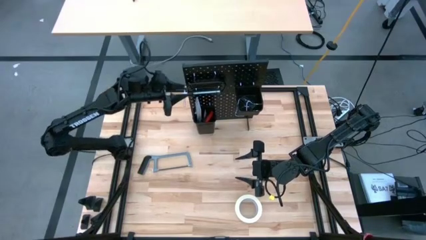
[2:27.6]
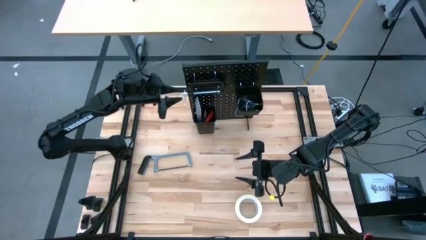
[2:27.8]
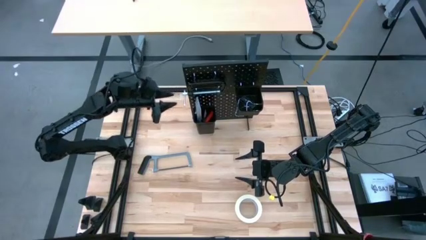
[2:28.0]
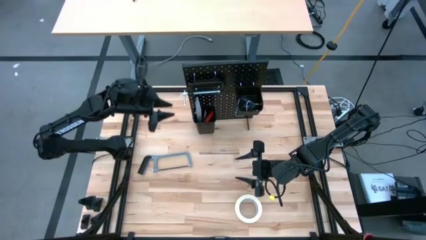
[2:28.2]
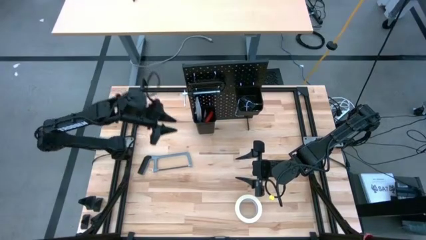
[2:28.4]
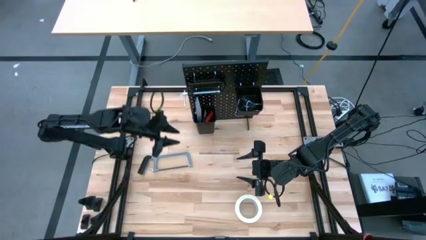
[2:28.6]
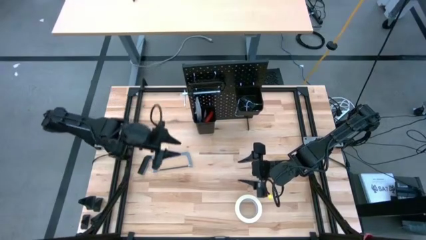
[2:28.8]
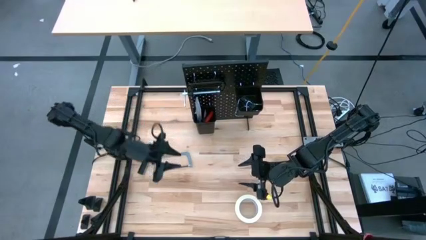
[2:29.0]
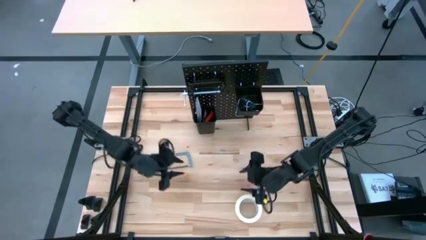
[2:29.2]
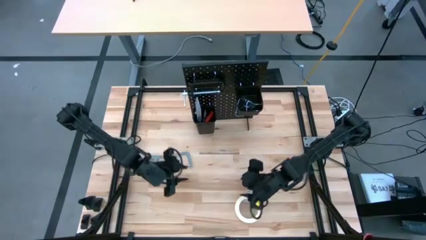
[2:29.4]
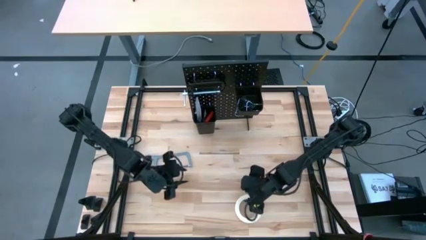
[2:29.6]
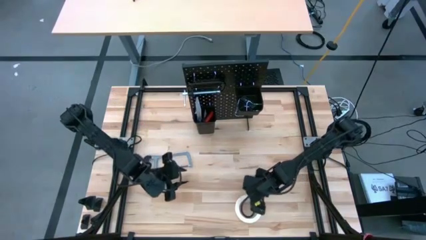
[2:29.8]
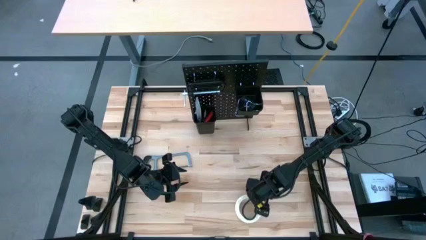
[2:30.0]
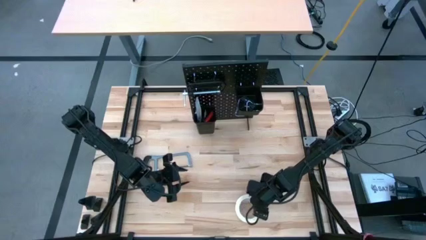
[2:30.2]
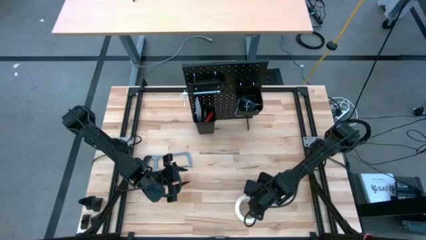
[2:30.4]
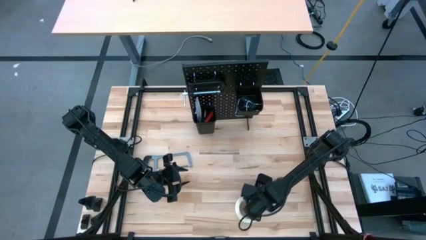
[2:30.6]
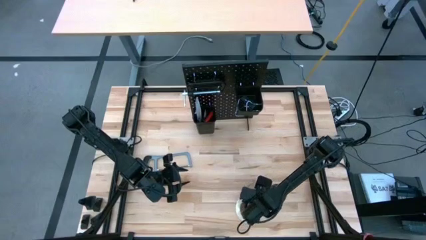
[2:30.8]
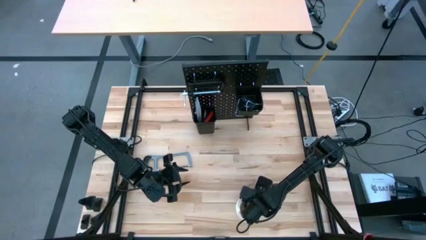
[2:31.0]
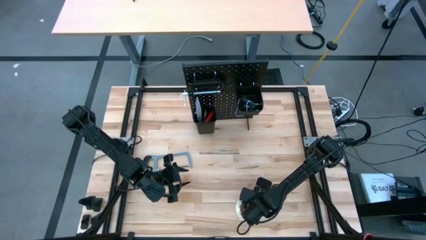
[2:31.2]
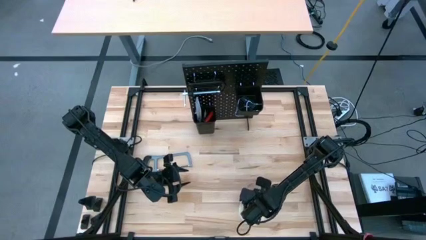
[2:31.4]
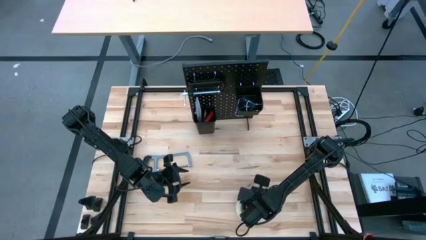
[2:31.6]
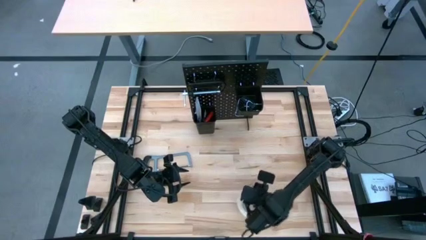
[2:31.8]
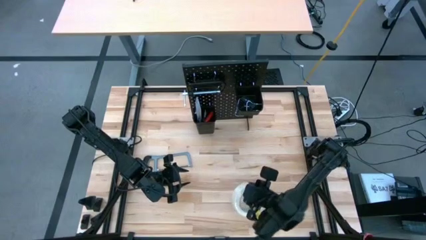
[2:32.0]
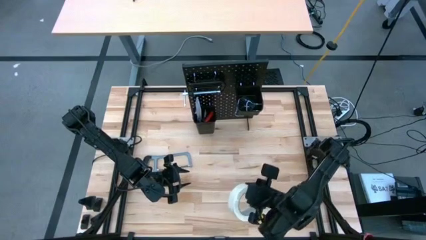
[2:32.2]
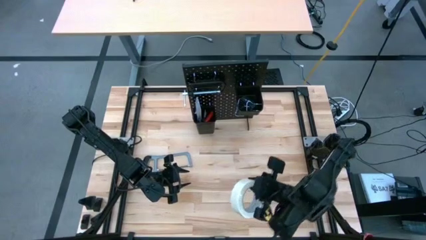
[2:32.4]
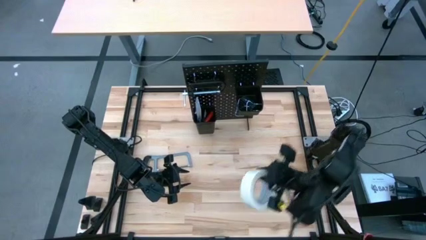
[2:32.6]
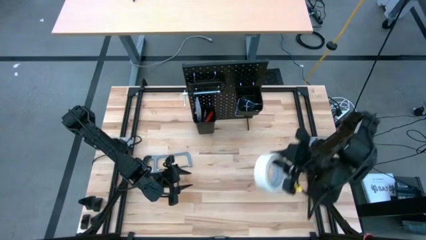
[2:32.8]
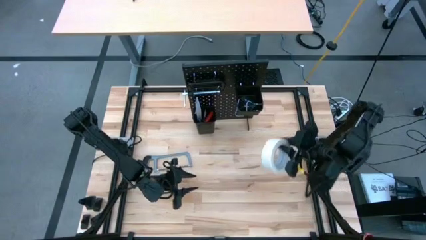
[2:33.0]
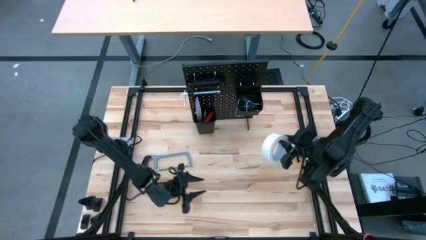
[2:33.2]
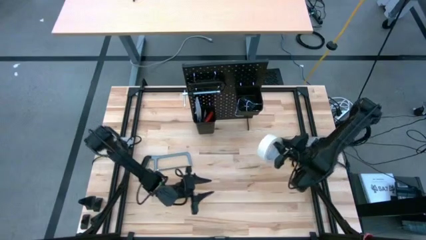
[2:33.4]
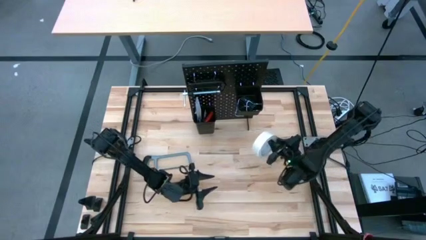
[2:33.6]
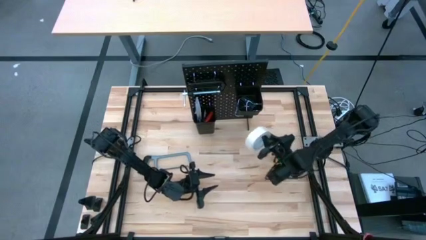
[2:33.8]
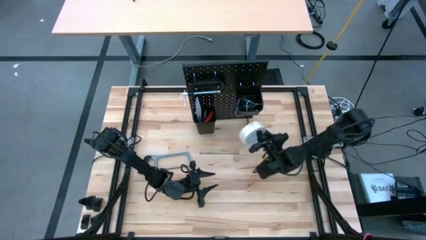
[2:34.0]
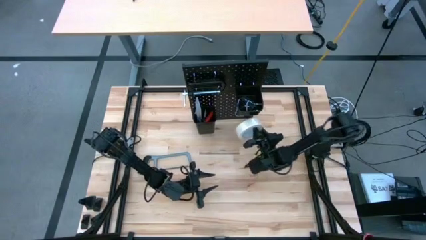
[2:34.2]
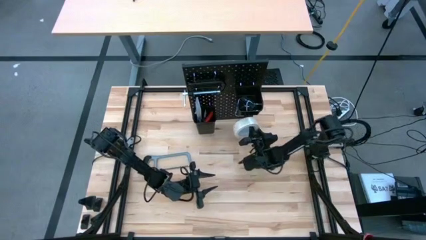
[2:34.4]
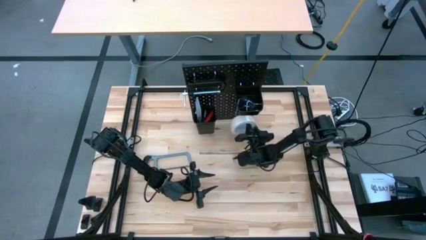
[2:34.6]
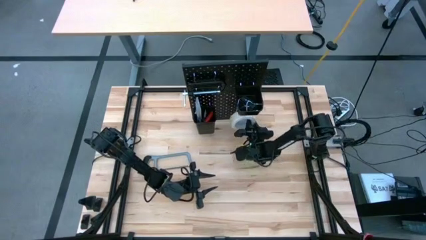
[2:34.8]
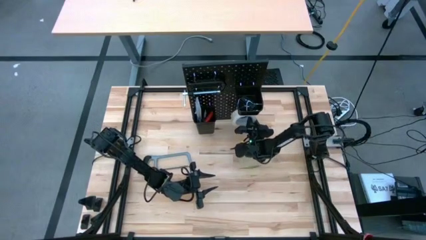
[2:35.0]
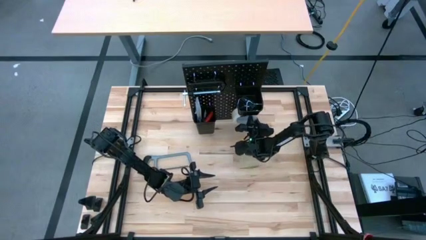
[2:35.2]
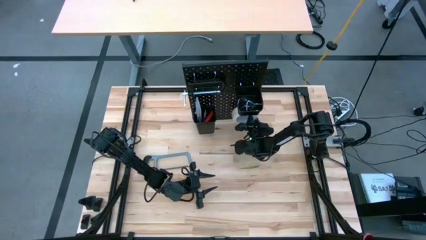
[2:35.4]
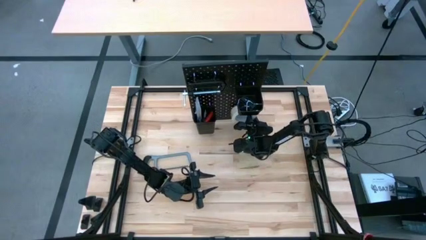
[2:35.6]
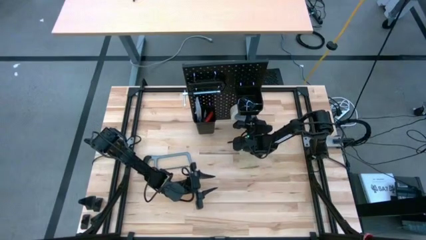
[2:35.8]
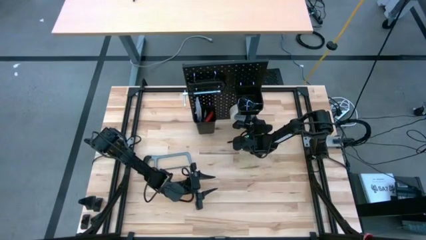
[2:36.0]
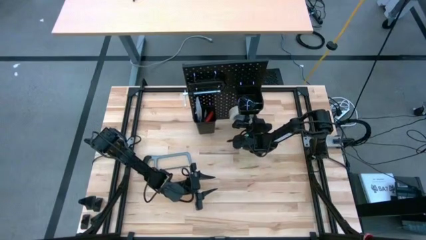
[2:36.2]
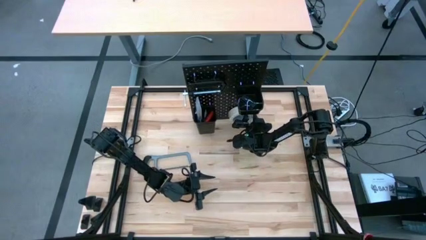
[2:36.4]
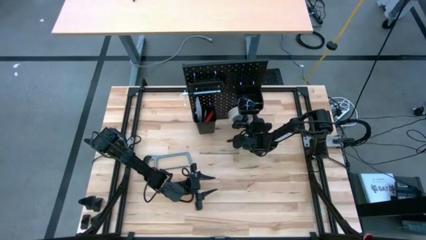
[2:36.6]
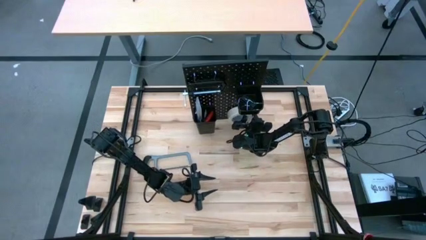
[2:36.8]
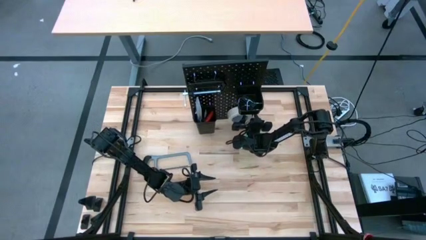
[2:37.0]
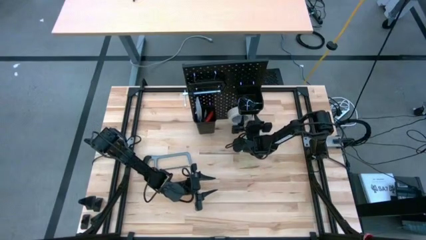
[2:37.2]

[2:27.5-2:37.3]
Task: Hang tools onto peg board
Hang the white tape on the pegboard
